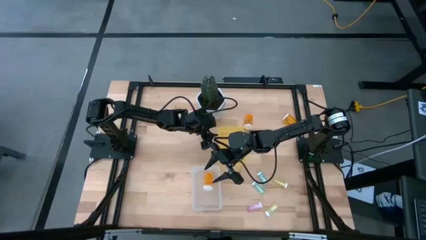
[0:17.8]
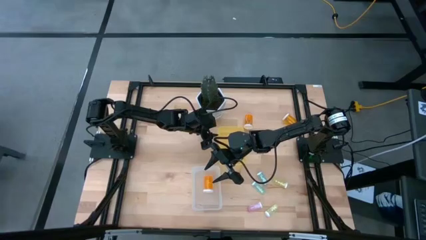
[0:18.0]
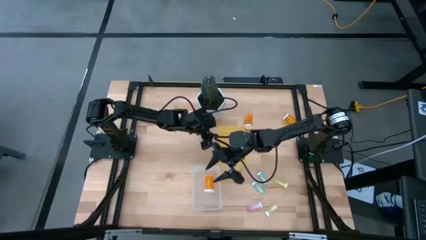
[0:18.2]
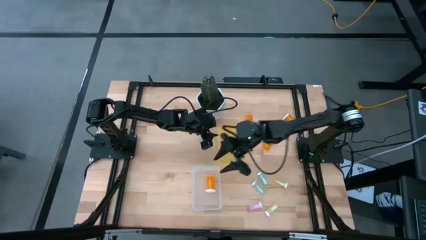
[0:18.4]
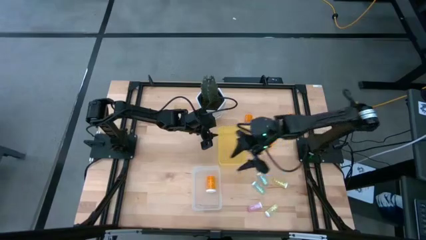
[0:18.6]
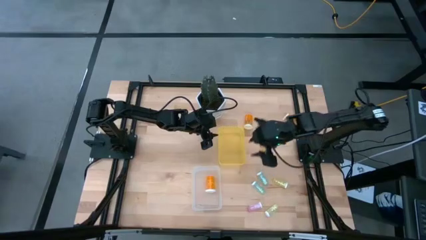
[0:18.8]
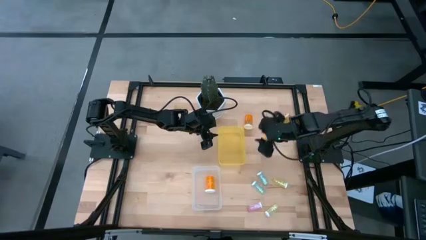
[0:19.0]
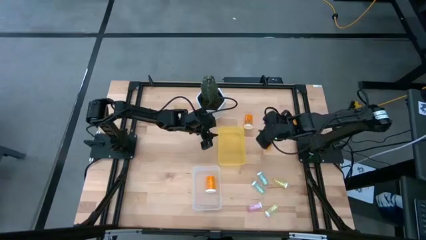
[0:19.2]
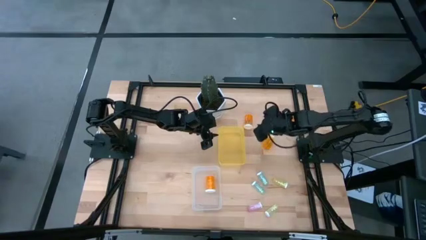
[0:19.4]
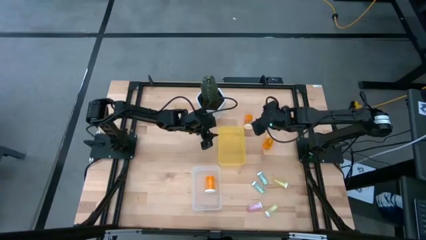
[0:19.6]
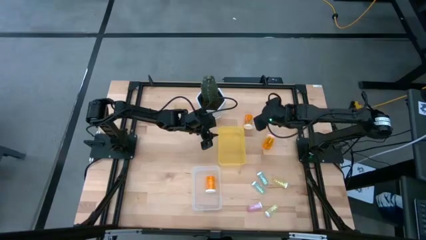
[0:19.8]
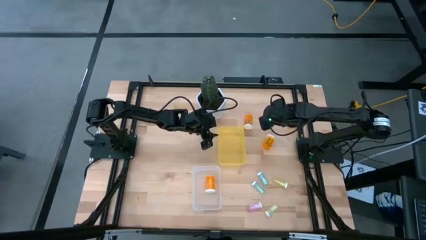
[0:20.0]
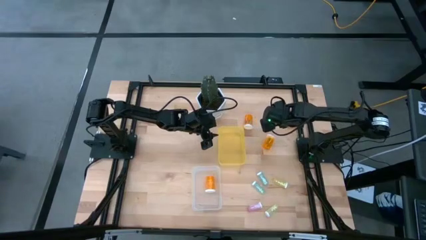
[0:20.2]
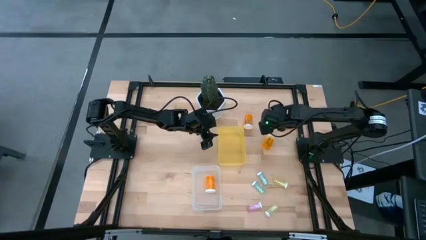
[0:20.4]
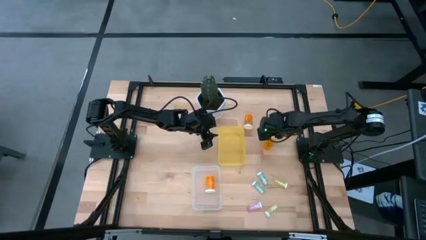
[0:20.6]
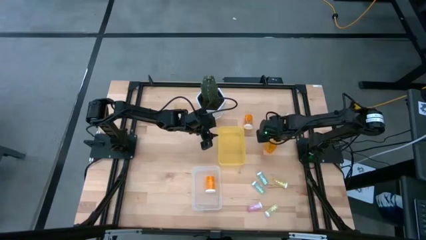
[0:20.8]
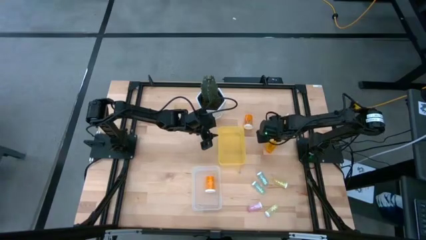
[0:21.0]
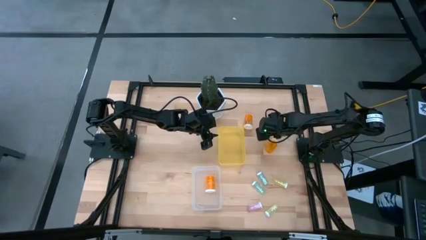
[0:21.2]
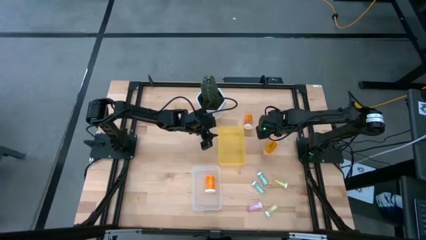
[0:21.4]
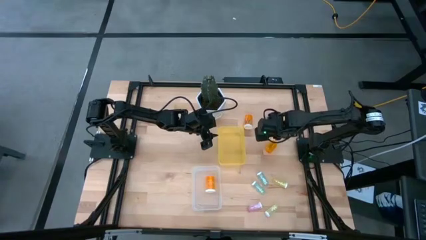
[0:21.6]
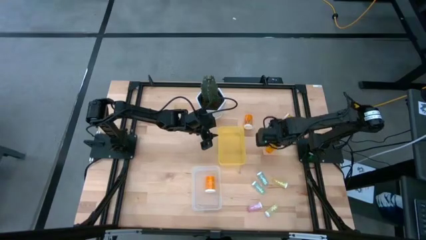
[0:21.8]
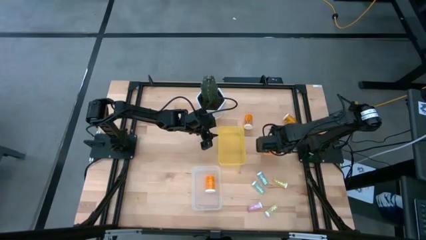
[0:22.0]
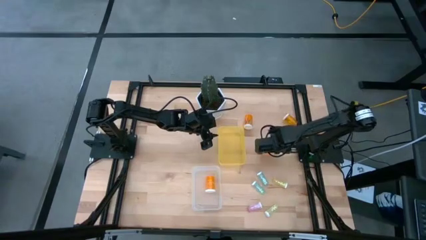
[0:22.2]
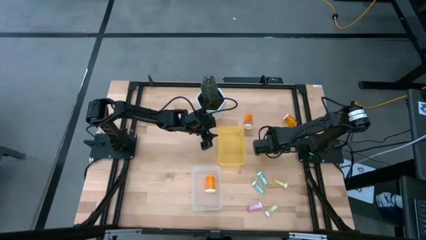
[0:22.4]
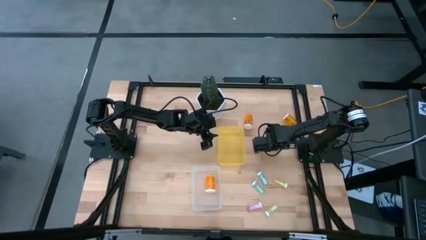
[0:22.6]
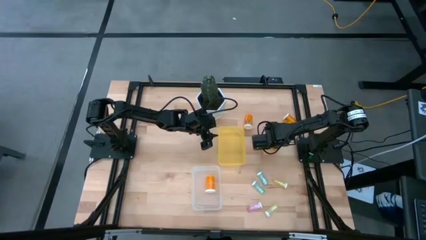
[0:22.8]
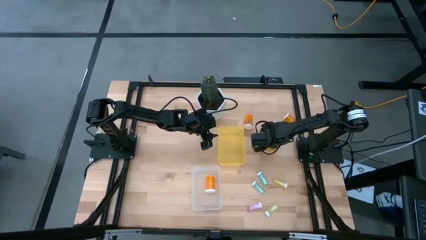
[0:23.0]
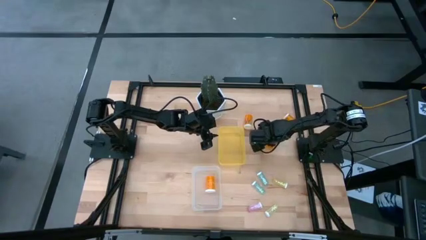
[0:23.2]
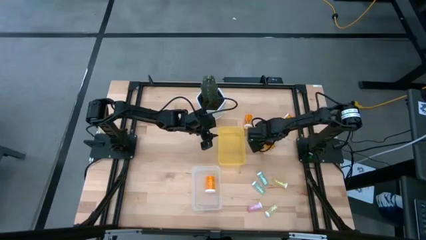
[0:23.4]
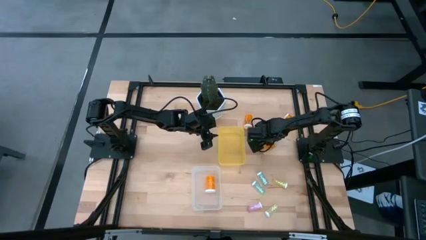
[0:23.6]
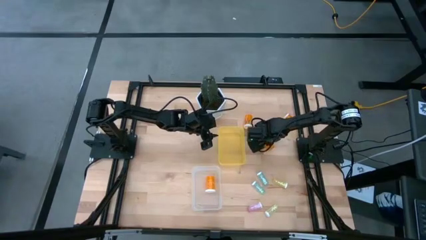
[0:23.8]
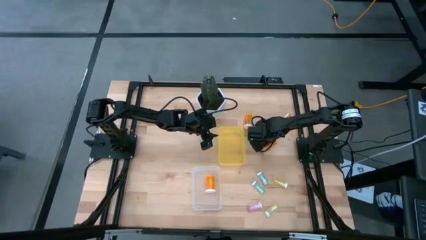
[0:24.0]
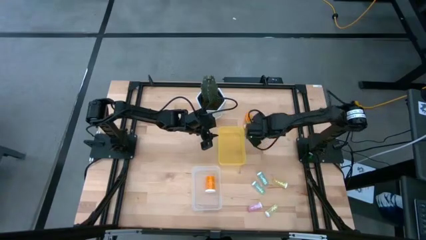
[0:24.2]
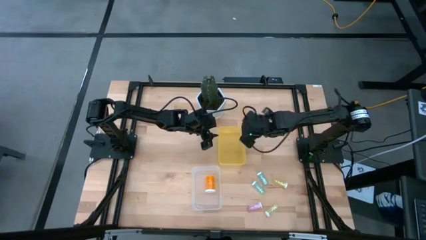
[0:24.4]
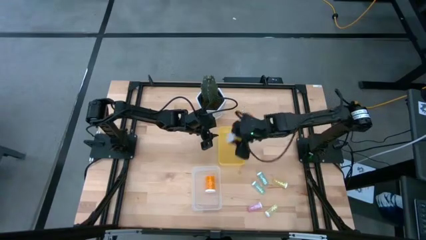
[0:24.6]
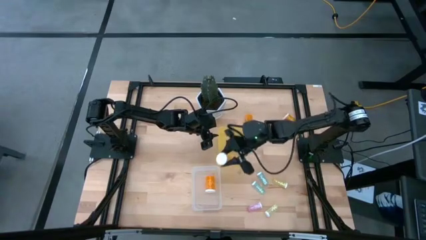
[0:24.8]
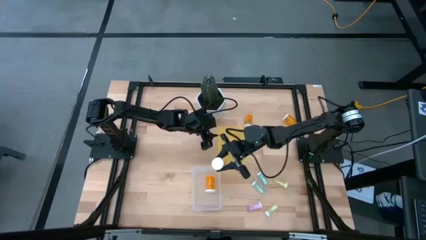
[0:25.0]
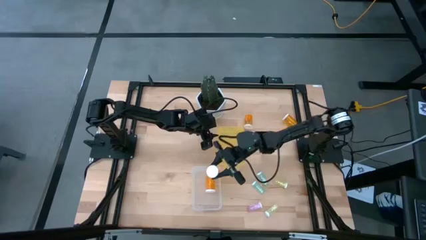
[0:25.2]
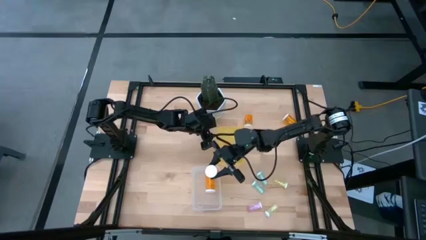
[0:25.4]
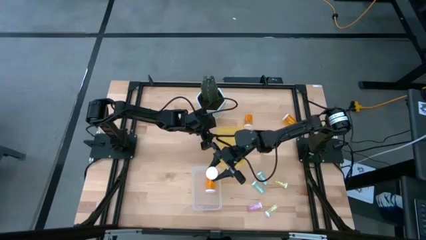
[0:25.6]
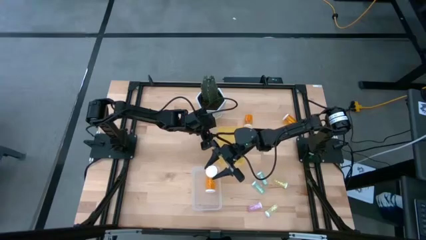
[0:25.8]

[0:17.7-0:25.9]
Task: Pick and place medicine bottles into bin by pill shape (circle, oval)
Put the large orange pill bottle into the transparent bin

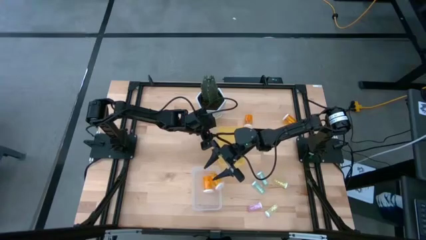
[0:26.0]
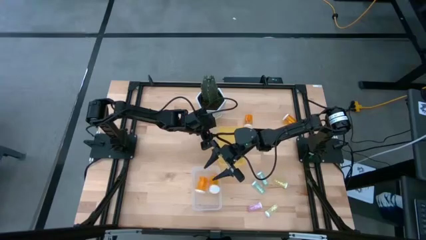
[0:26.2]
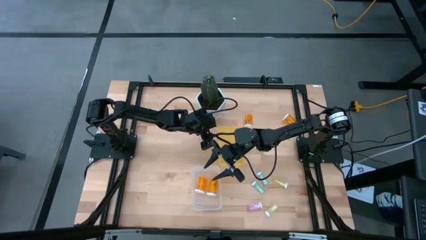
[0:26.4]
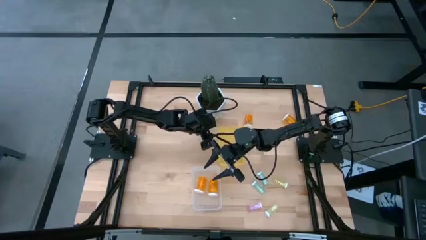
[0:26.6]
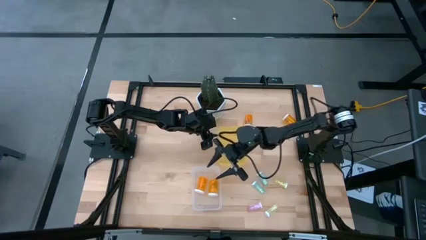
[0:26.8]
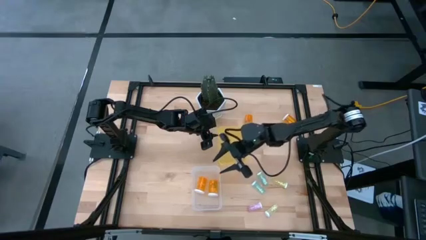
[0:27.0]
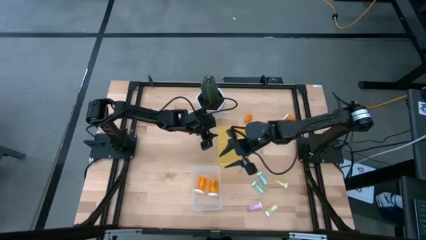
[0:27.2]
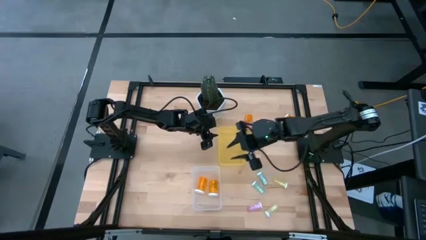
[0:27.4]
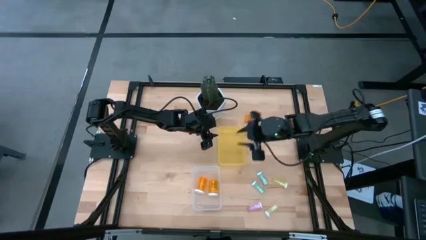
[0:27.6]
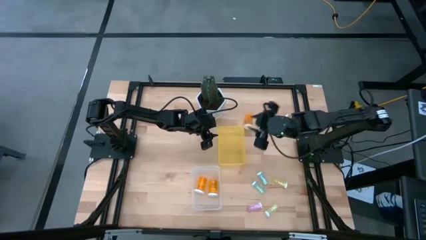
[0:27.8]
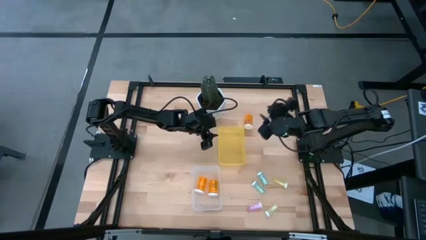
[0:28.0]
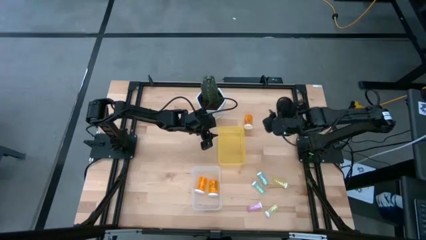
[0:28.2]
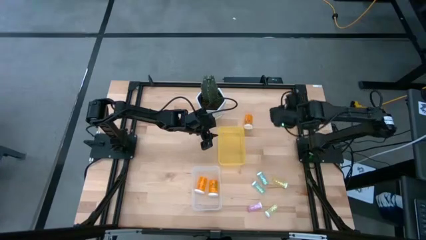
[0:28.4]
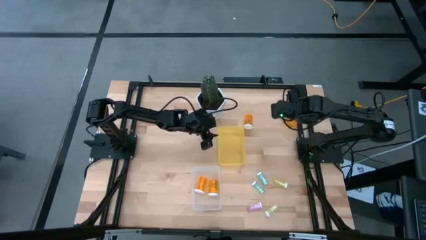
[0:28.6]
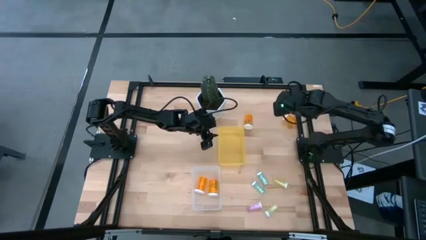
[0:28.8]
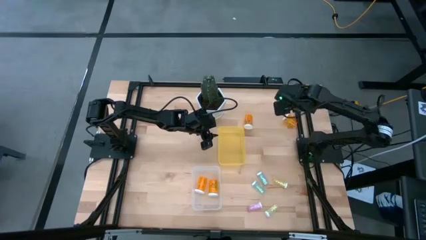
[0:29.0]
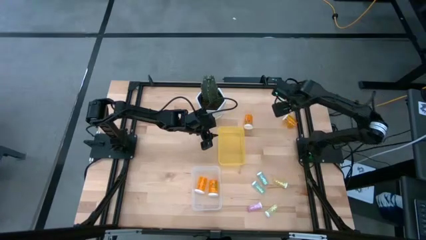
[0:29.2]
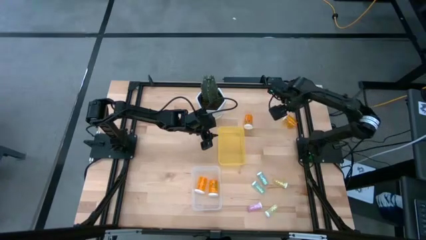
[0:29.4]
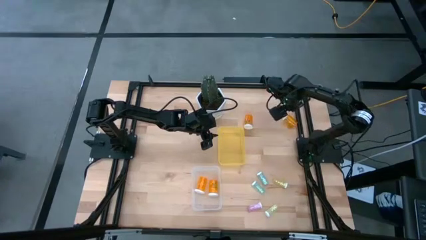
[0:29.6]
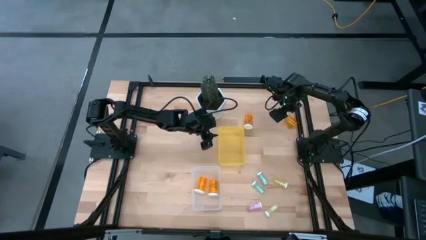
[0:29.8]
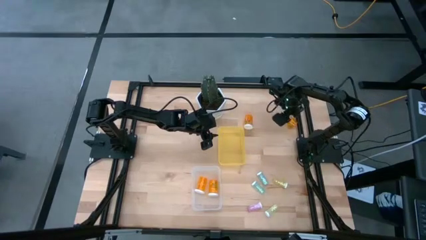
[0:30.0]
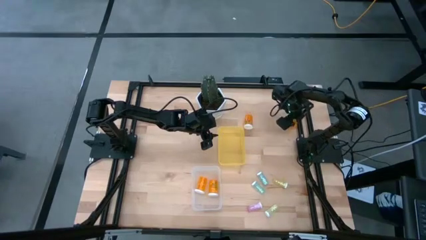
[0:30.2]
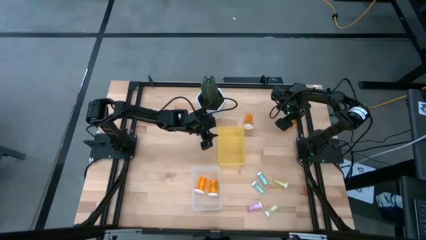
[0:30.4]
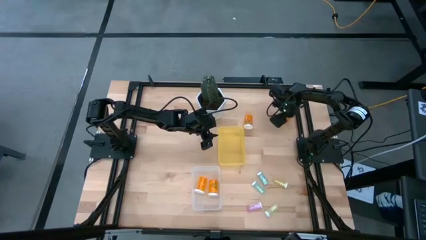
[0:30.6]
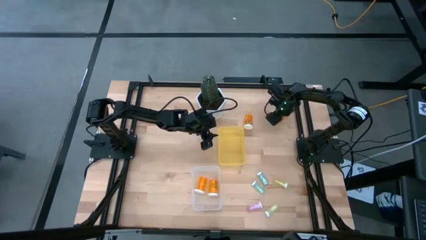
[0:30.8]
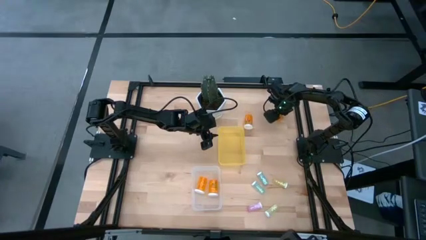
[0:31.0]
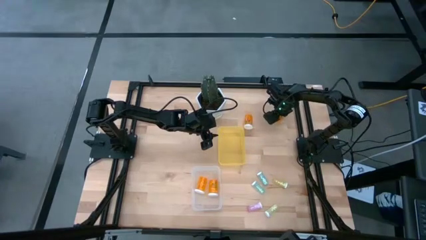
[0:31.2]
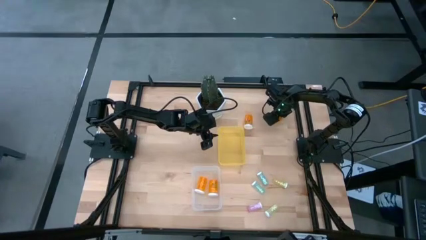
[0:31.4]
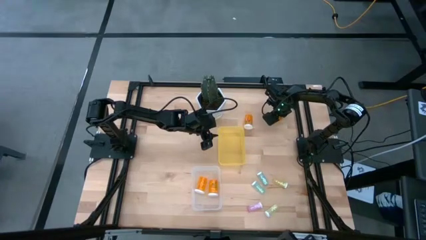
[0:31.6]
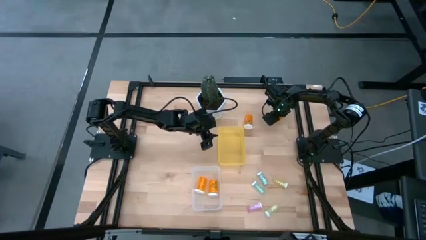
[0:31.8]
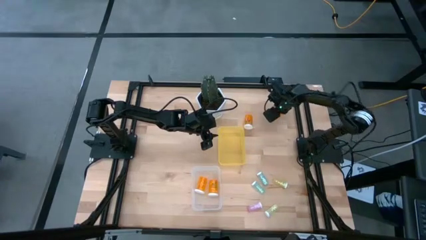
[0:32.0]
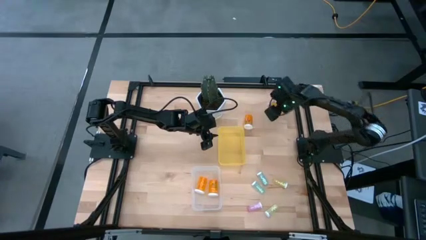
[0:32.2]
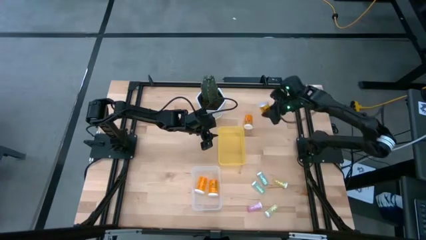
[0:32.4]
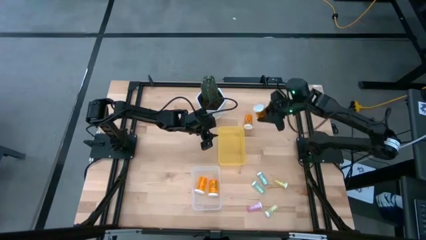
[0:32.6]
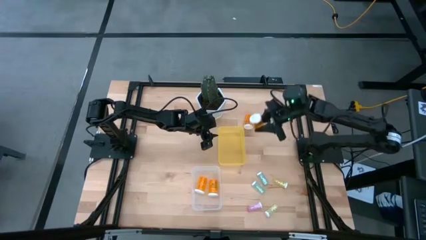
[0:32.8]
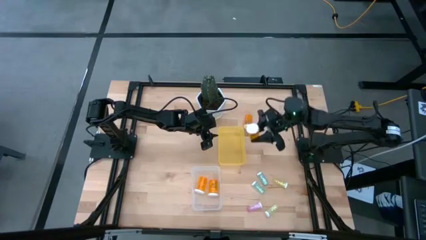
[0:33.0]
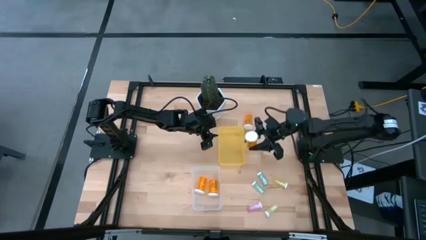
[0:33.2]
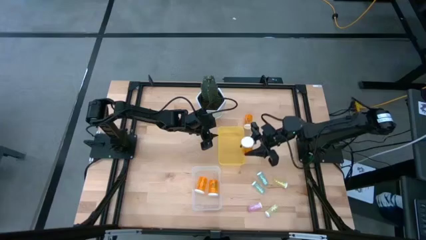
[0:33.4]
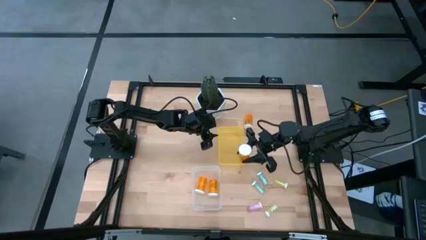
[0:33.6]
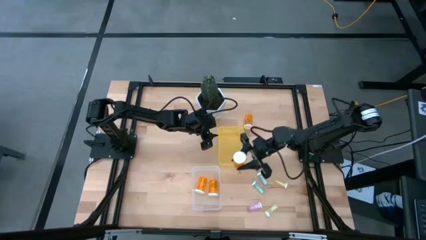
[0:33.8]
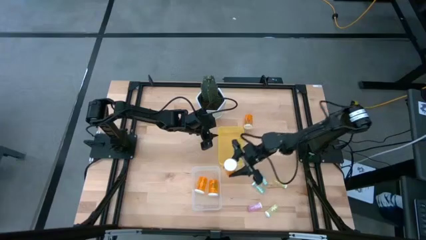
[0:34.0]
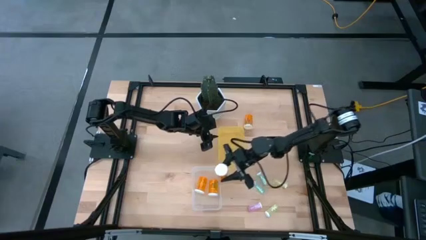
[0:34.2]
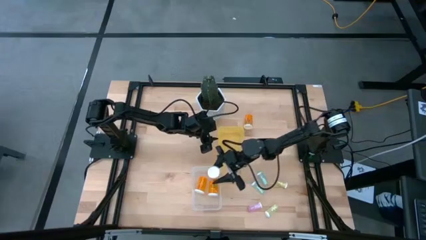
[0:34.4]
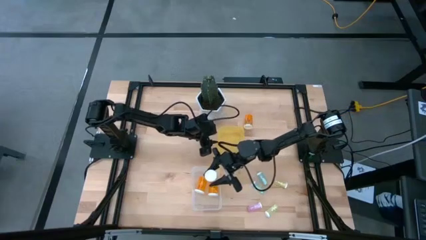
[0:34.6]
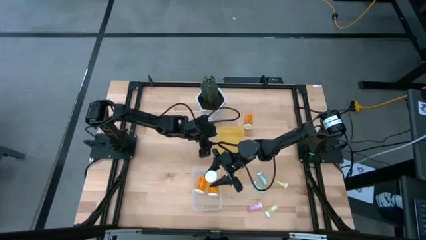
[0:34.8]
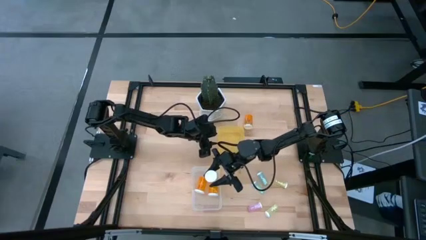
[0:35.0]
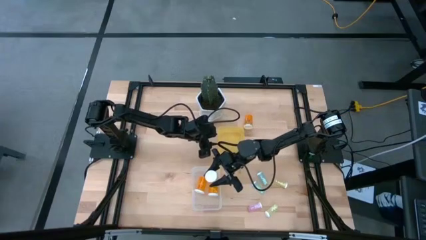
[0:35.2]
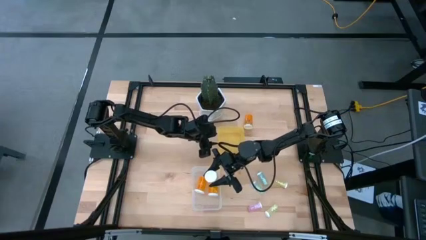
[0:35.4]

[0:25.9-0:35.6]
Put the large orange pill bottle into the transparent bin
